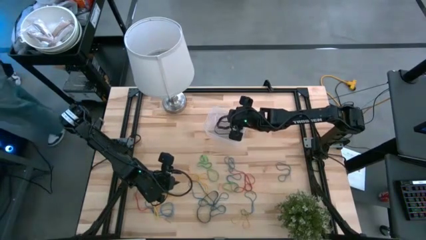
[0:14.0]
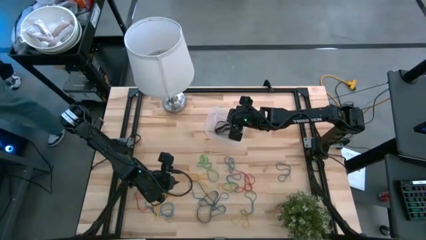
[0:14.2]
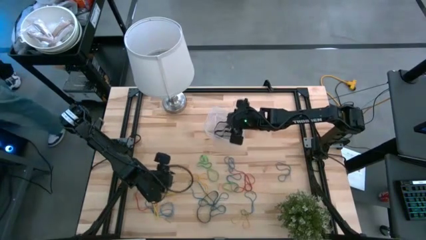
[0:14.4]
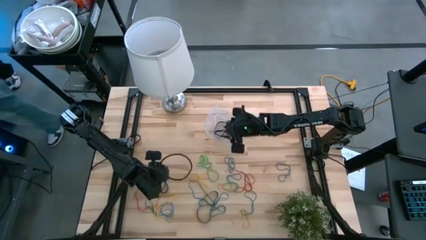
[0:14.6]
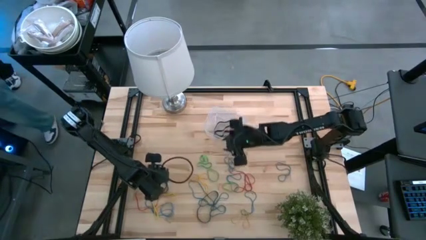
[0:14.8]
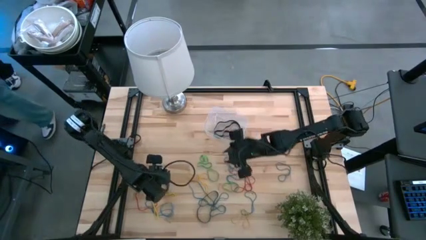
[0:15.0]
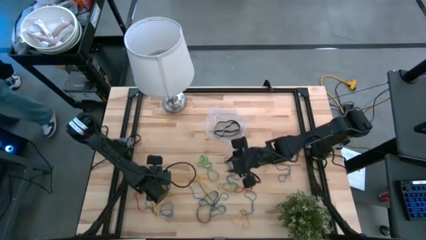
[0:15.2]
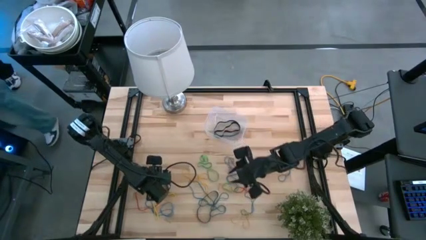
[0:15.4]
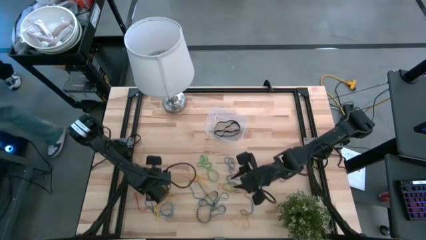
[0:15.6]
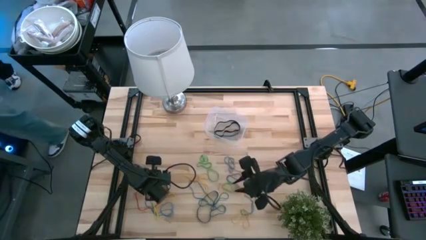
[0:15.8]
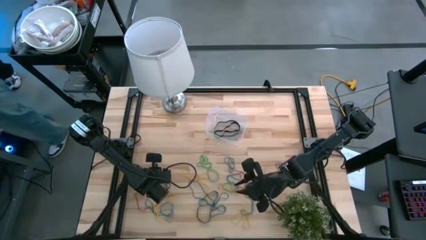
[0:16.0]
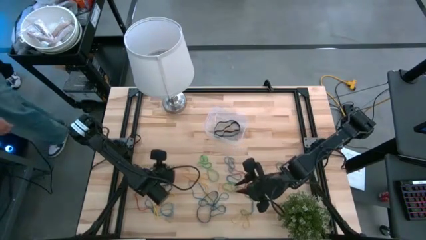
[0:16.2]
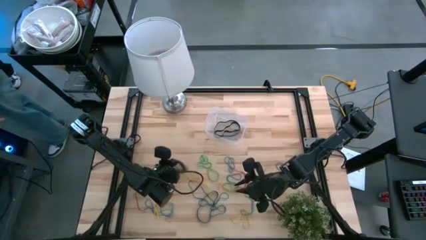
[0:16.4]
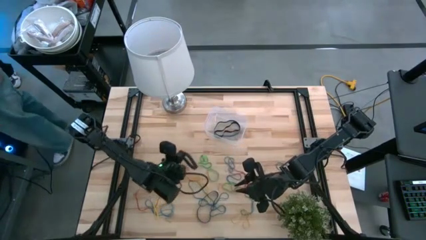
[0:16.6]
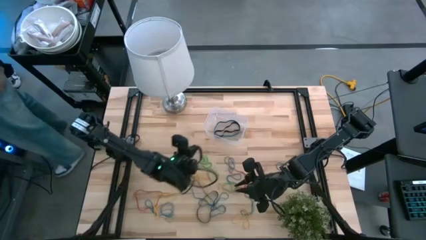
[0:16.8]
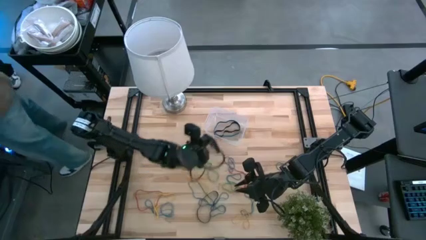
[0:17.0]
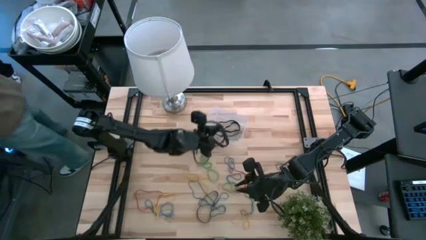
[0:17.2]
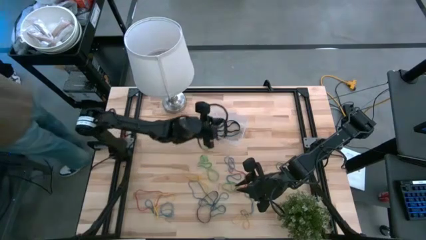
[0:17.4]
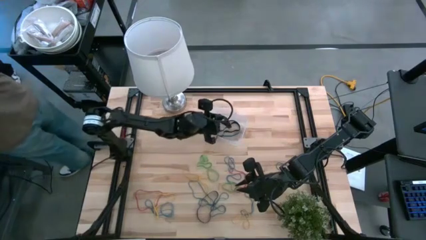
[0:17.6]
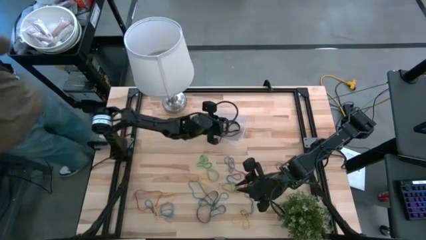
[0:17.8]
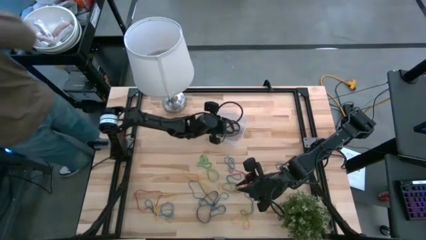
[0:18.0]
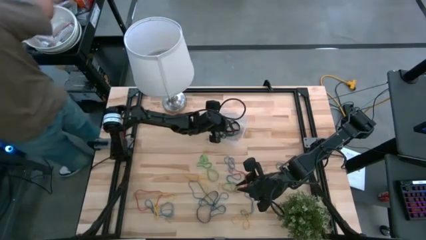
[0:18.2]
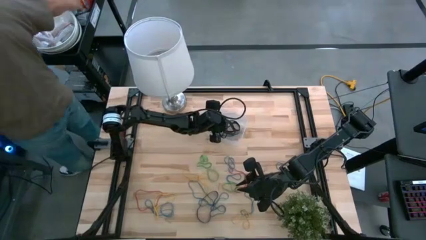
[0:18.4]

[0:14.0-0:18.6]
Task: Pick and place rubber bands into bin
Put the black rubber bands into the bin

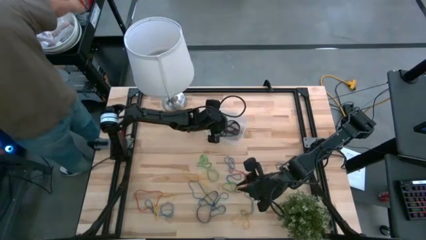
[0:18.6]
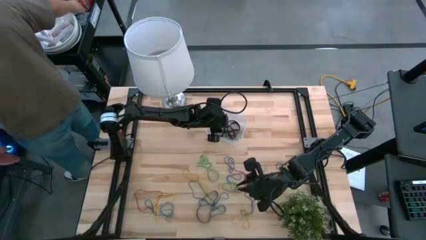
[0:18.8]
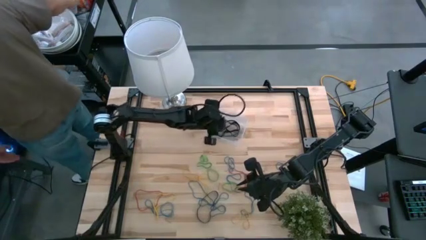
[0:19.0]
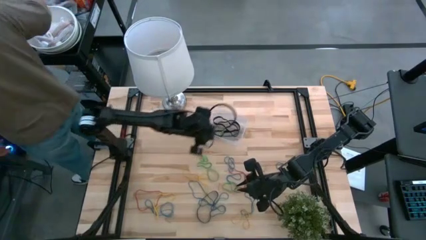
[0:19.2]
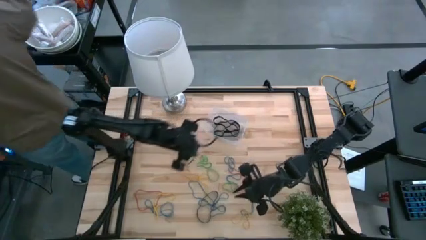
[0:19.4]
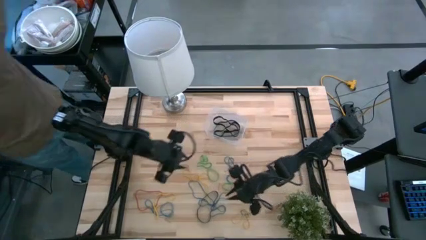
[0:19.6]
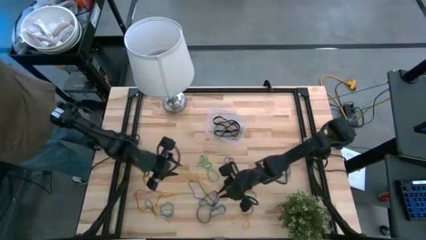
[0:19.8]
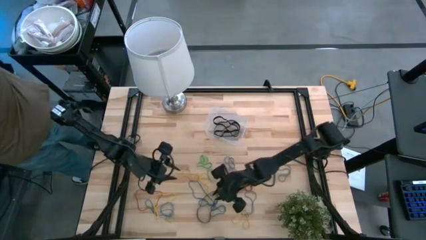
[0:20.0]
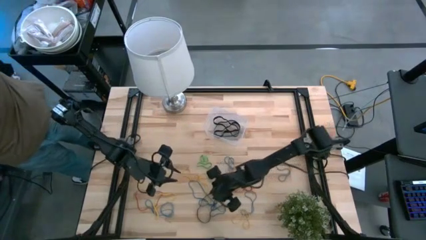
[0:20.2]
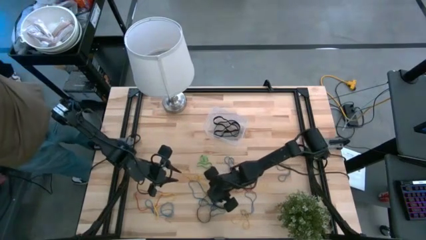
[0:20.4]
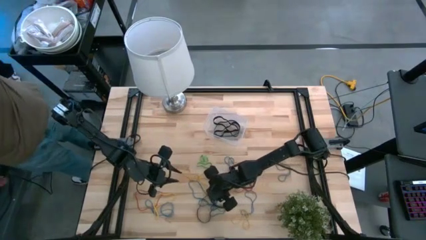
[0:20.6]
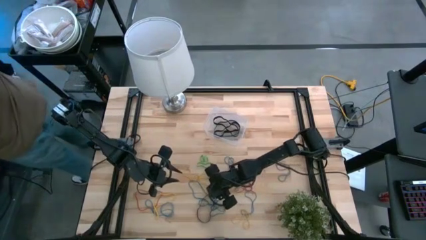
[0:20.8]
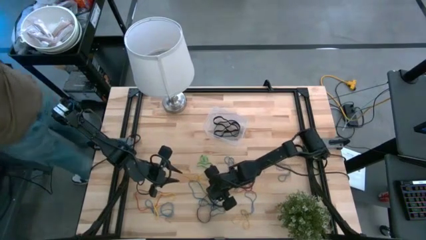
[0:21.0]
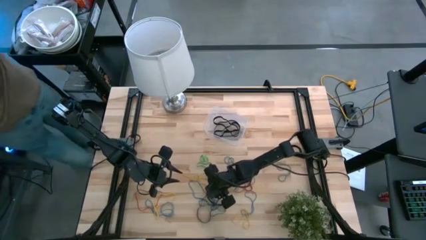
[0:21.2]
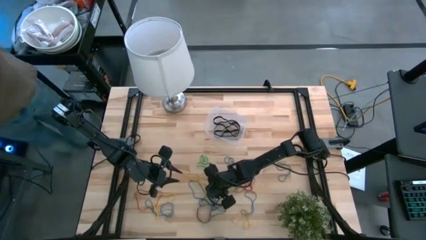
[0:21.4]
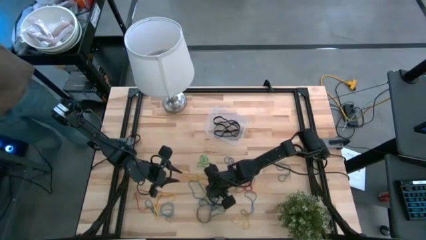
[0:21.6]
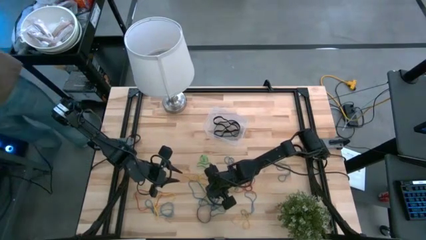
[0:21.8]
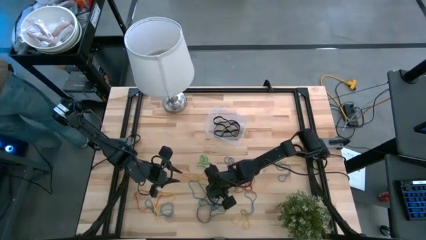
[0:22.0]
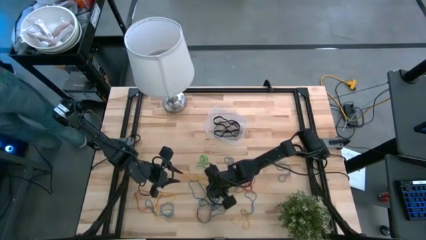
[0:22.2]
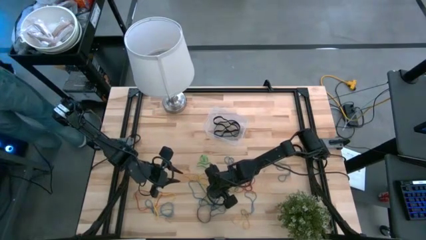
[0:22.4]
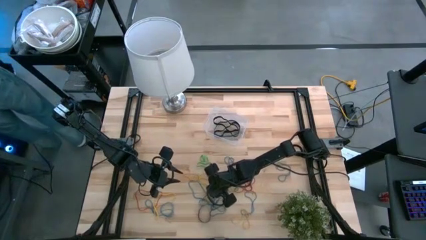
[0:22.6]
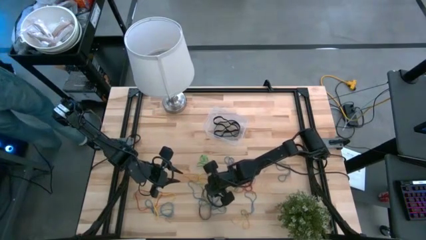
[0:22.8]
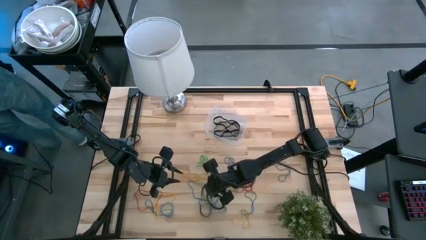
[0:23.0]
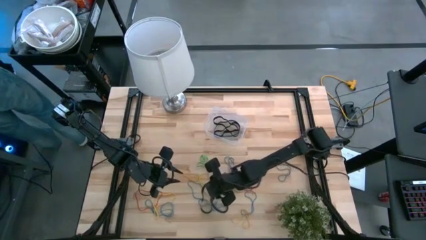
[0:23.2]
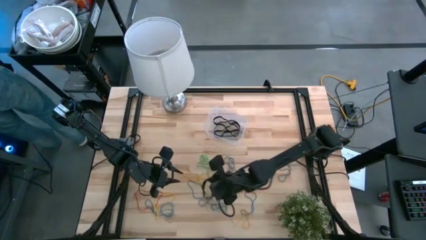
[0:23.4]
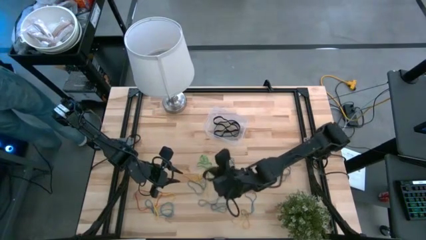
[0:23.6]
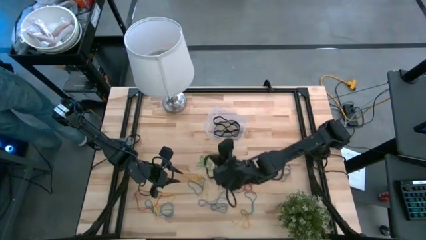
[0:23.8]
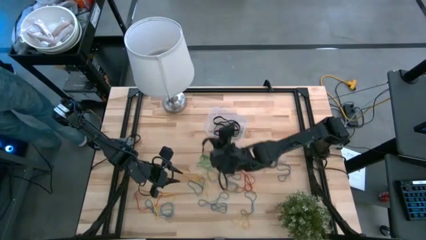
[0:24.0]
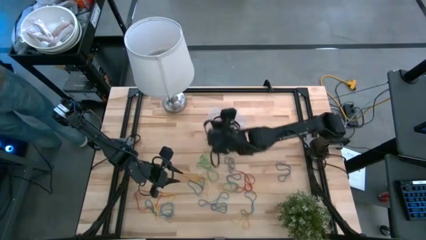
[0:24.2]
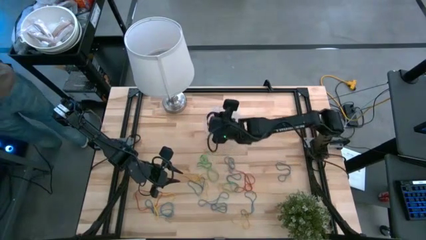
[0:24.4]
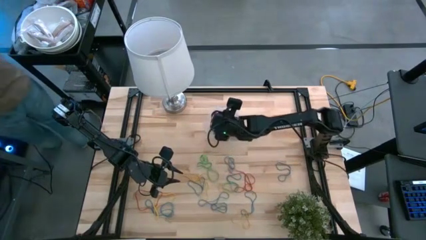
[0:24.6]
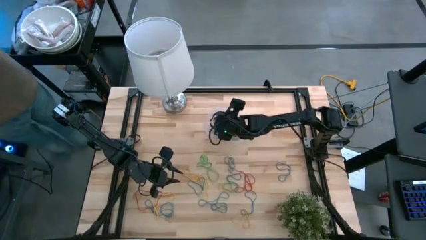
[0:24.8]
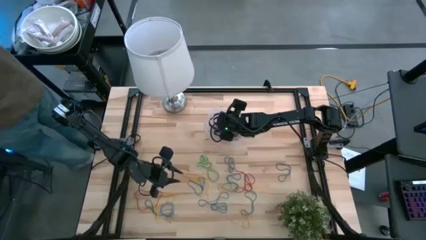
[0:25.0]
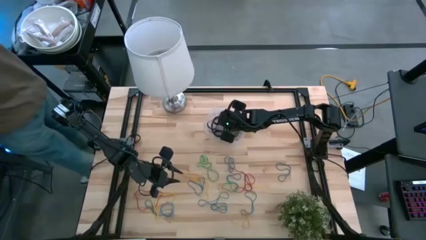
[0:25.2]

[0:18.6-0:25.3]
Put the black rubber bands into the bin

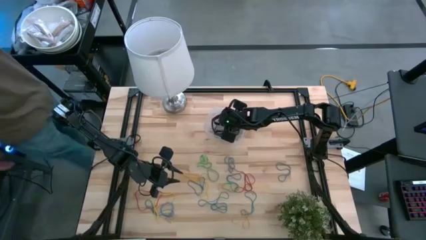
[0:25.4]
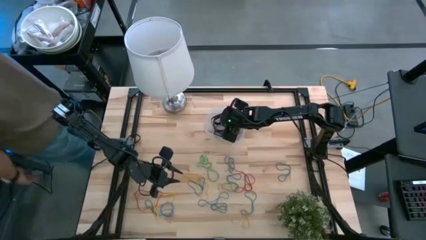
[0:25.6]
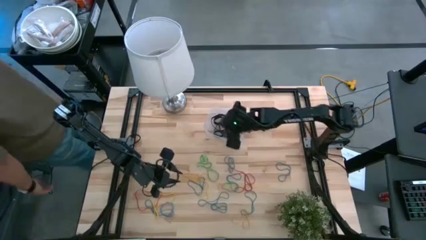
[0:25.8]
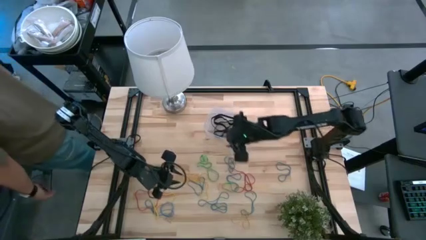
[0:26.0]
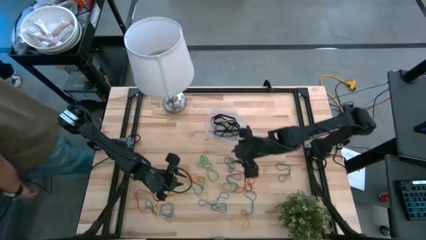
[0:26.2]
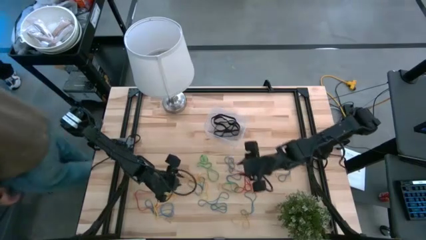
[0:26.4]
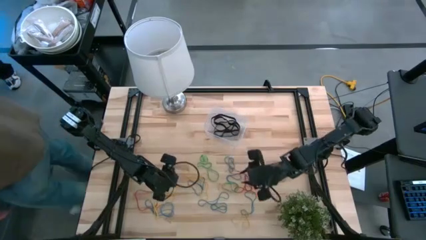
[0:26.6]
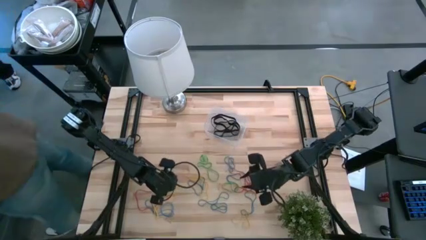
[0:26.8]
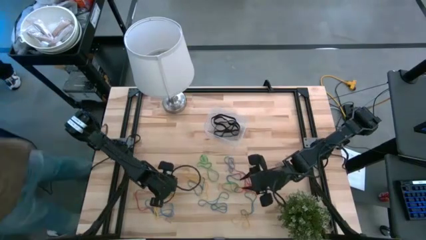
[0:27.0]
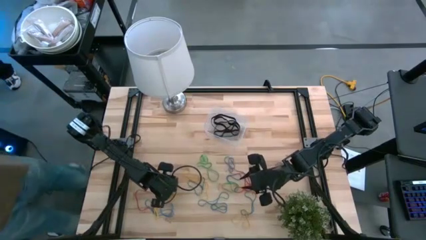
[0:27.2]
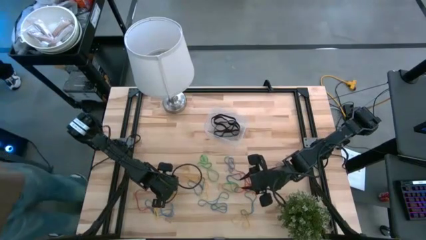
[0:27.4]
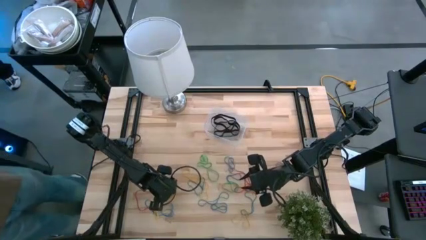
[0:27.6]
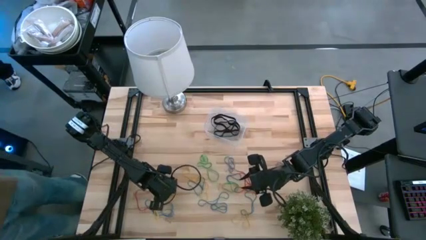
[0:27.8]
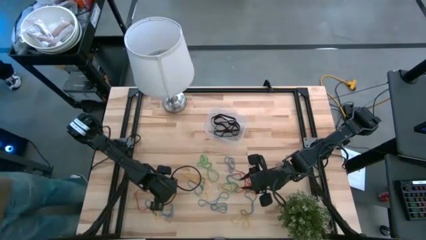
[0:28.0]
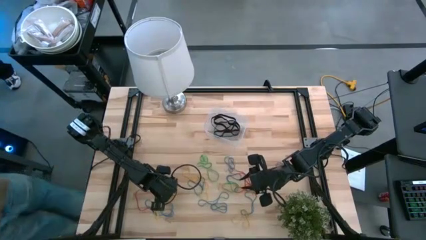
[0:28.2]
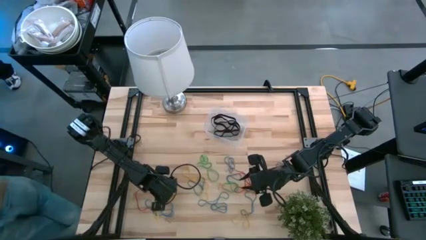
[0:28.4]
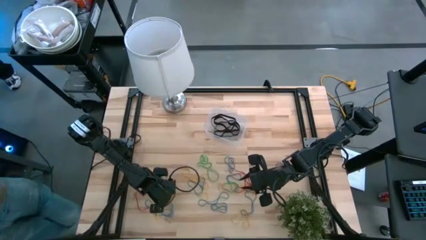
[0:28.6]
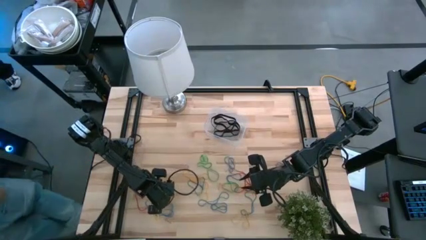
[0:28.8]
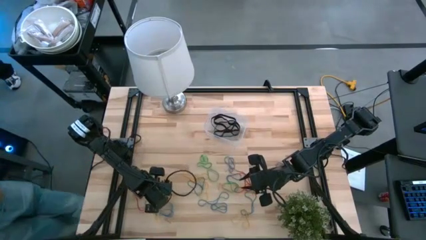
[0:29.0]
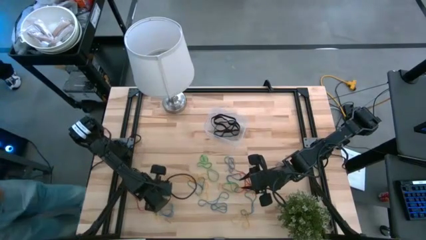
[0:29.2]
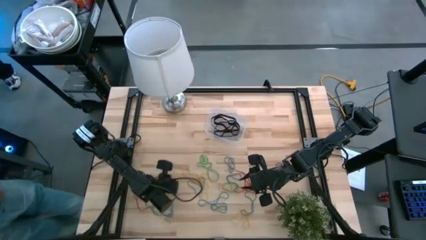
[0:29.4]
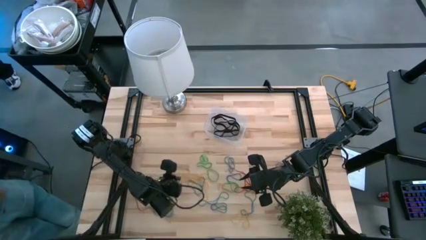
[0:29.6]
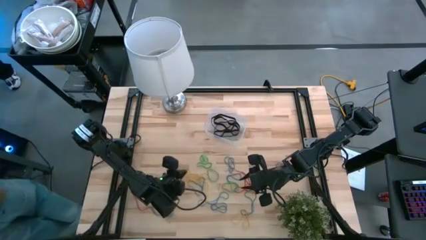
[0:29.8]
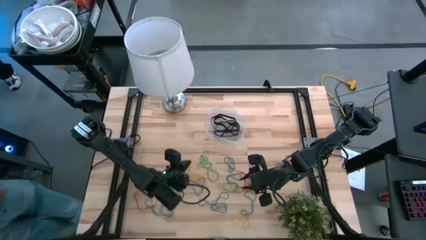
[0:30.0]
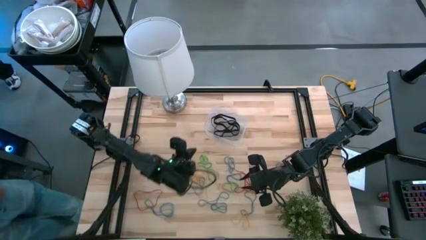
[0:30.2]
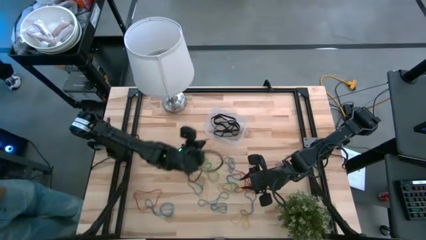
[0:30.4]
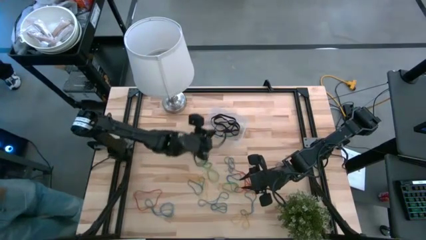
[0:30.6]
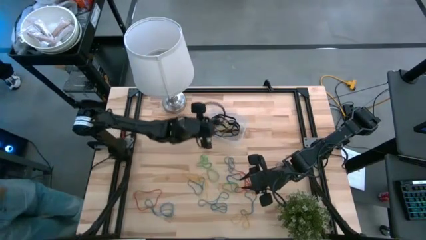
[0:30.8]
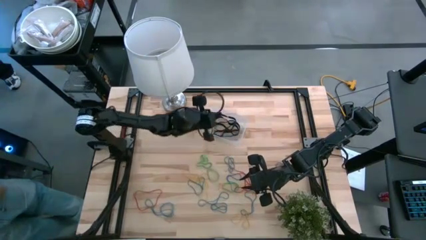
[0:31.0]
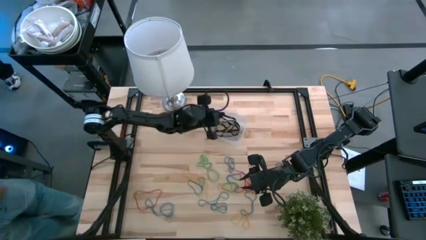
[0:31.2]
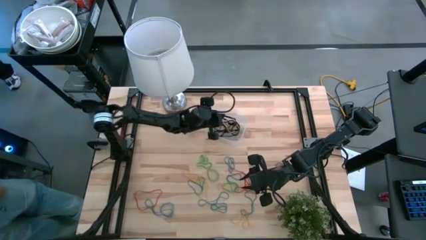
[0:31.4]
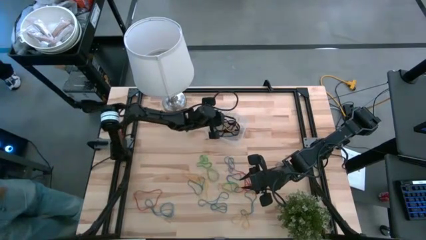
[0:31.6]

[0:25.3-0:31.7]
Put the yellow rubber bands into the bin

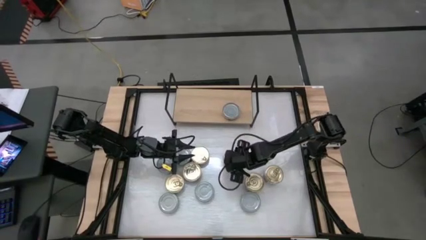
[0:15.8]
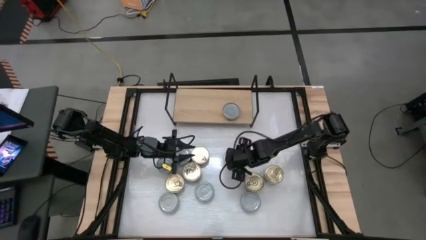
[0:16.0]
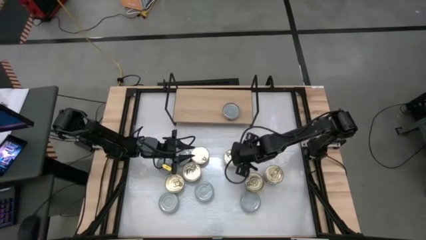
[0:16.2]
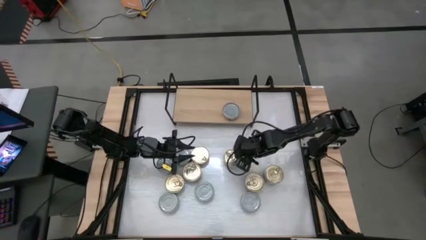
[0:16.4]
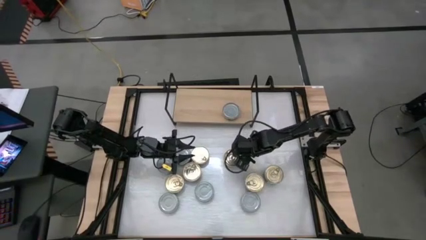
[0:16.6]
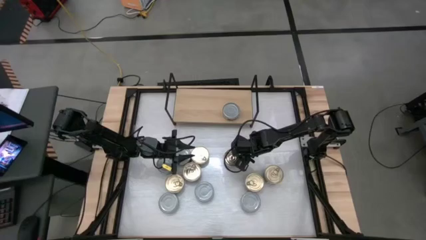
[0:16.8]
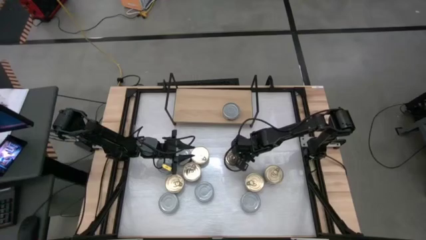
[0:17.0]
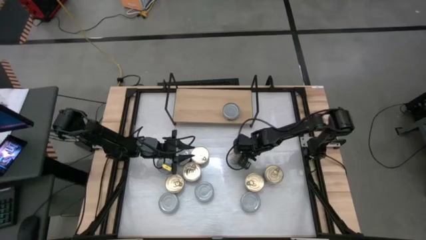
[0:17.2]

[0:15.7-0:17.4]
Task: Stack canned seafood by type on shelf
Put the blue-pink tuna can on the shelf
